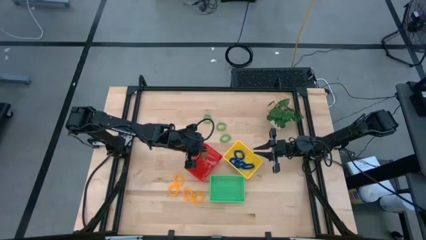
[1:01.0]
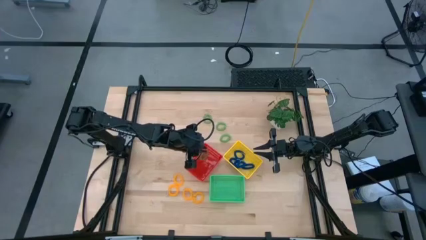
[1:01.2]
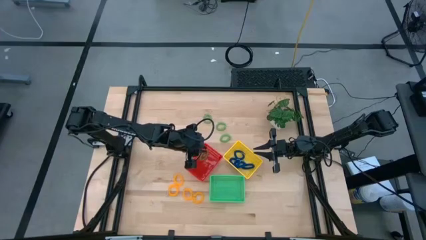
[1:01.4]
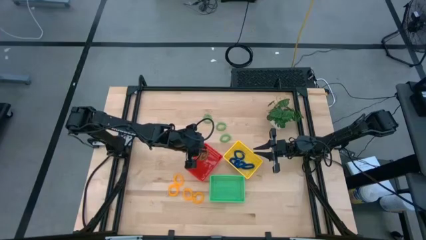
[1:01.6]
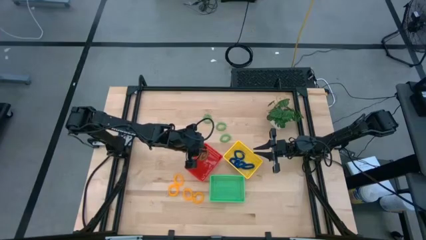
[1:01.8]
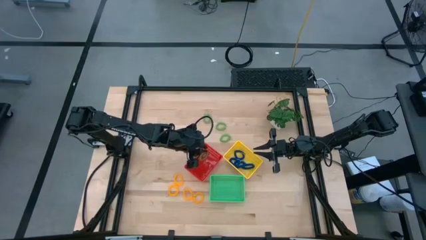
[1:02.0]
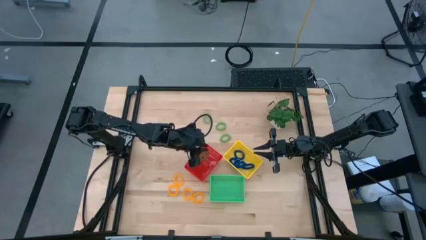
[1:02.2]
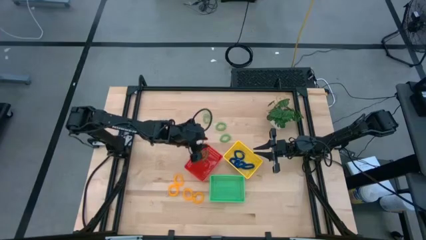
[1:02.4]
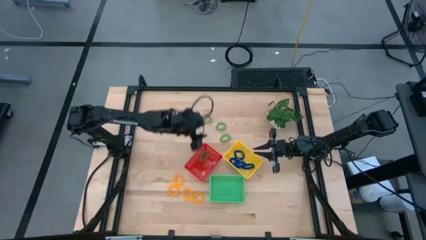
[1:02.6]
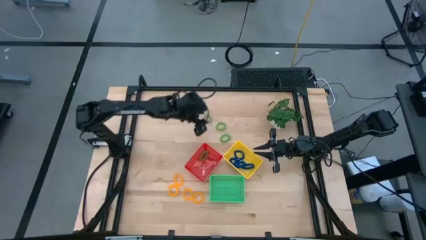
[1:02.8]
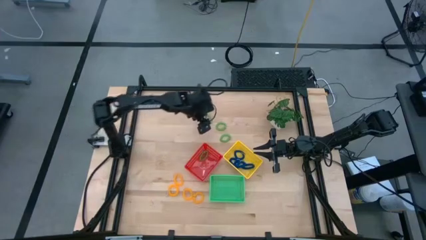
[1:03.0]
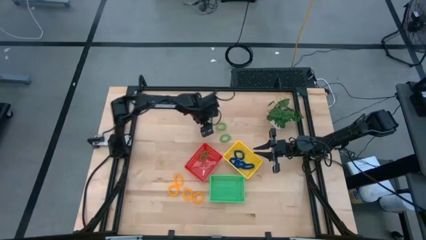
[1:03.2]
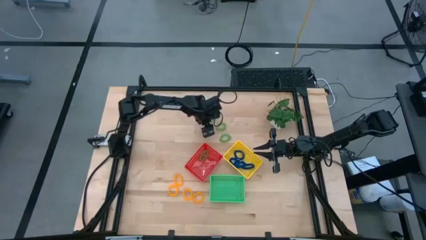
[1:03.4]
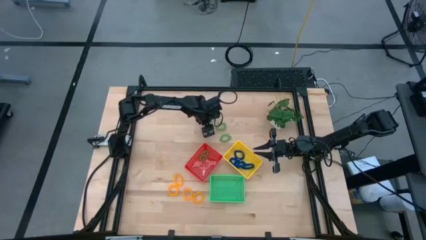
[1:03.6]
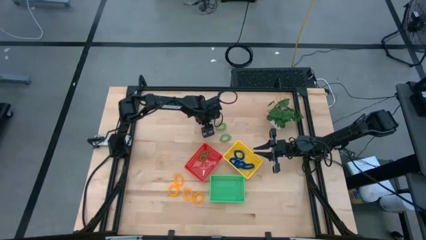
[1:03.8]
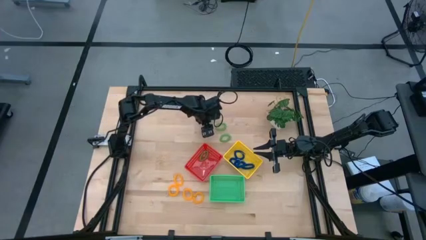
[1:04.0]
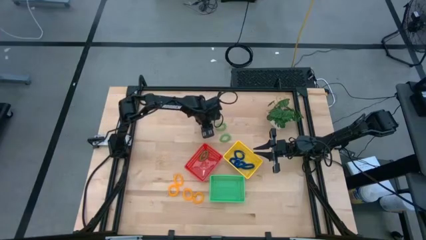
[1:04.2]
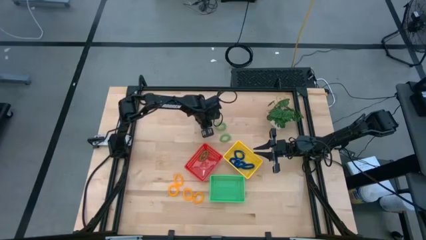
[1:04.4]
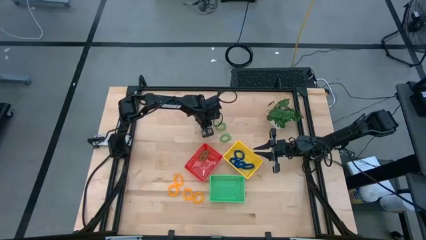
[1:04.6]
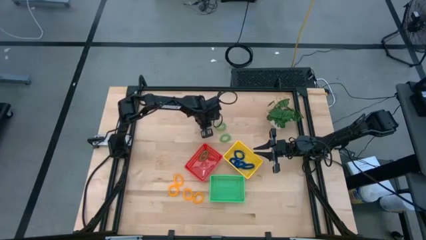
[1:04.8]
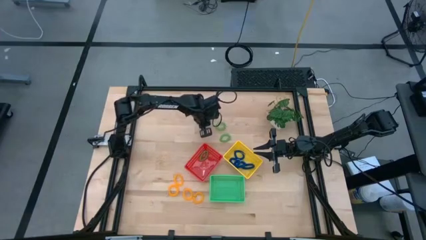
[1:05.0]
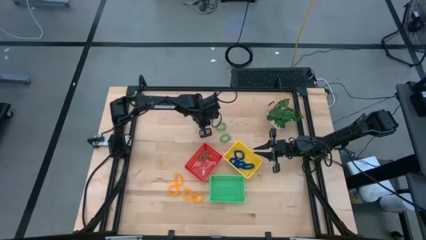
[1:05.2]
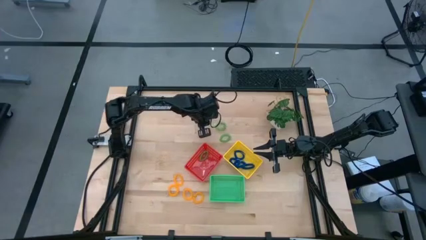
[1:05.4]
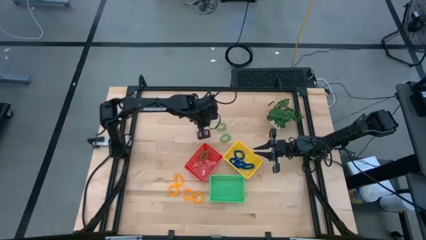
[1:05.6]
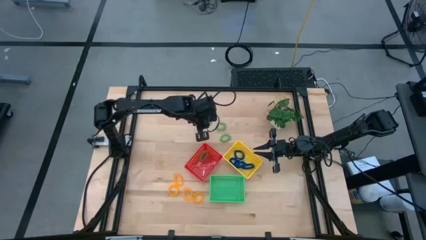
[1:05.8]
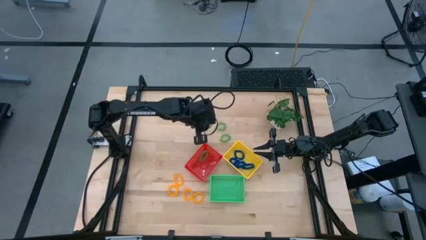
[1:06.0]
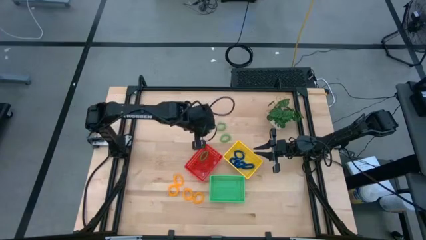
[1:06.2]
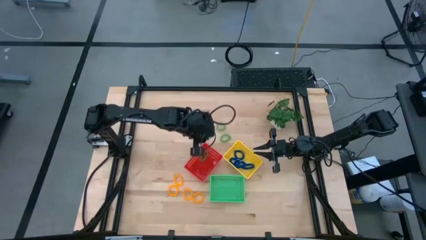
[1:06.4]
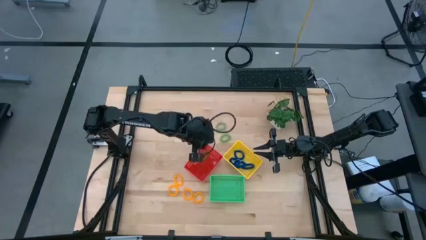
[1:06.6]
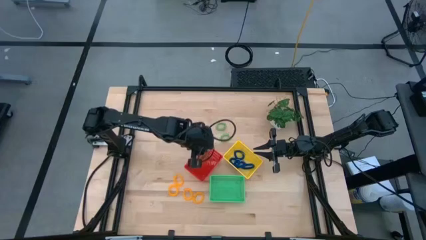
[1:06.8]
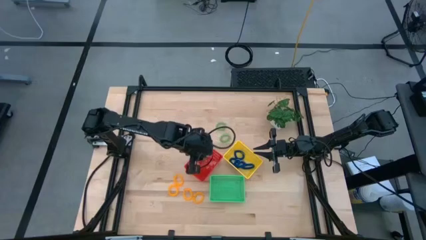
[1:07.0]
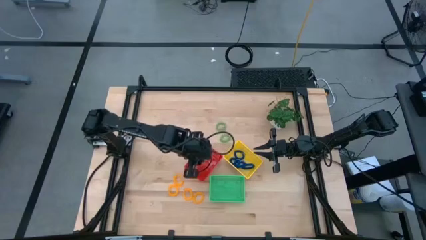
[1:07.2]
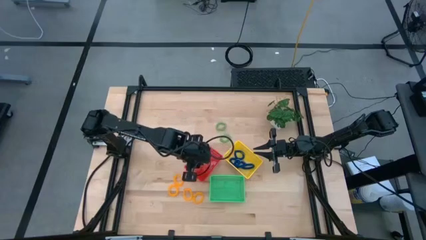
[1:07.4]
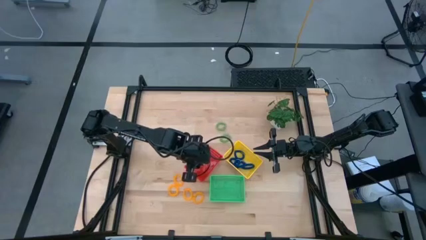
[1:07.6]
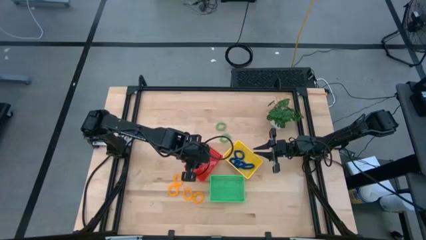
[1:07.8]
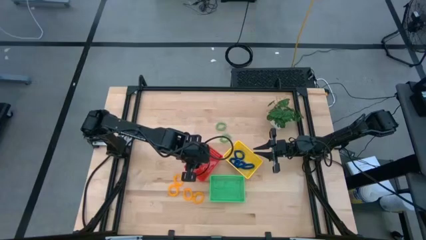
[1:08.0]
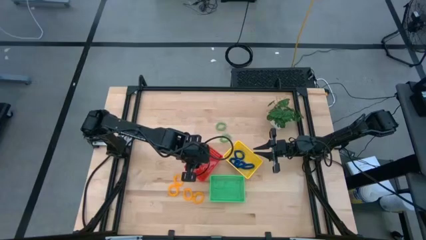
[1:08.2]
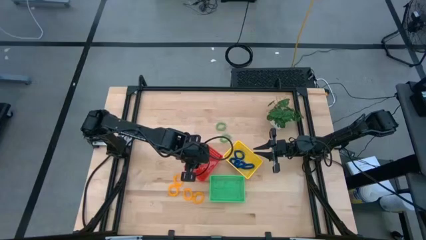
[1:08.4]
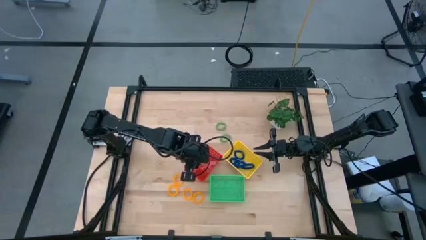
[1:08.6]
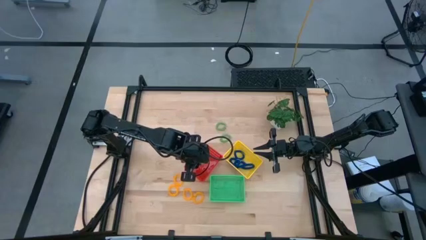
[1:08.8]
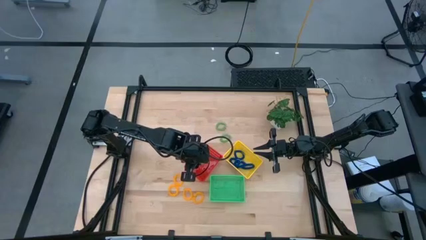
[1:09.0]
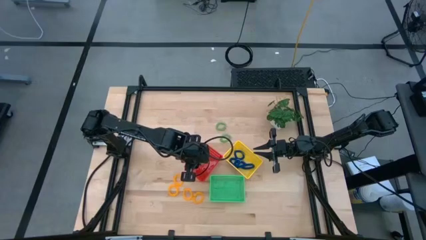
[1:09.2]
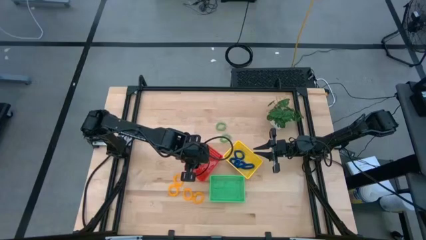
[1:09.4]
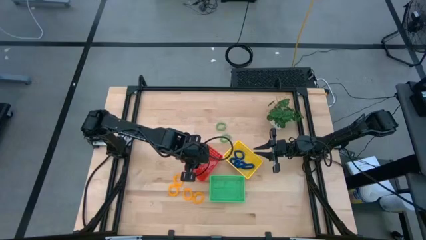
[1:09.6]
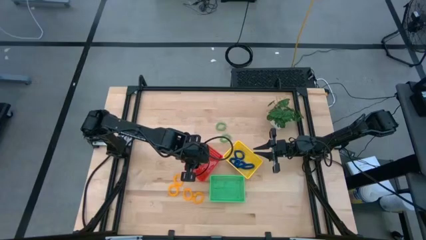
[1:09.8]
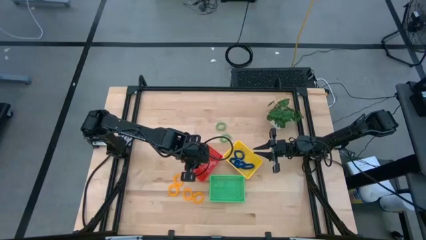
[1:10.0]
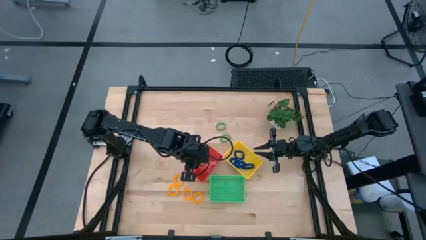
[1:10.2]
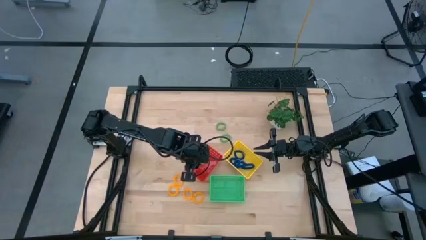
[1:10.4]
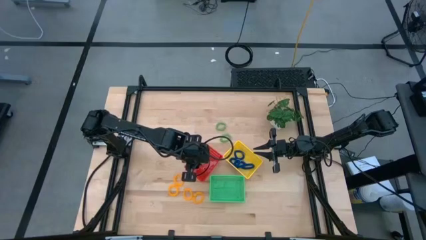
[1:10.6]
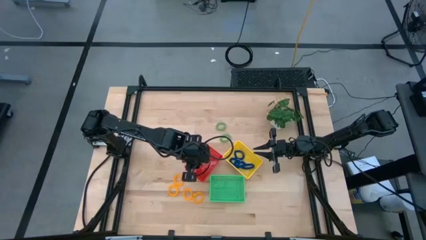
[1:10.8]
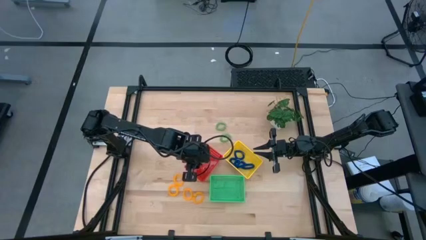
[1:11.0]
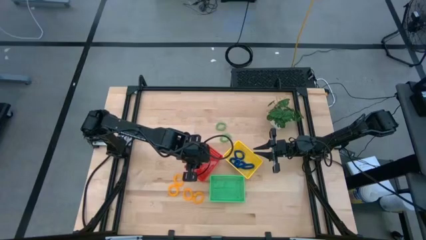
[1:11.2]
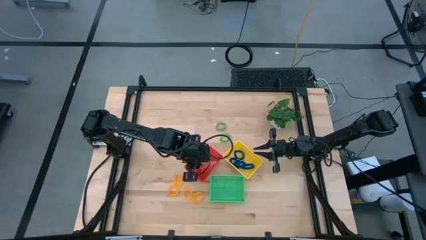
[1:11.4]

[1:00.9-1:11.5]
Task: Sort spring keychains
Put the green spring keychain into the red bin

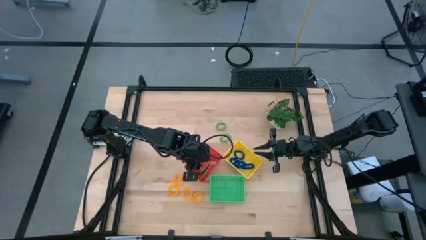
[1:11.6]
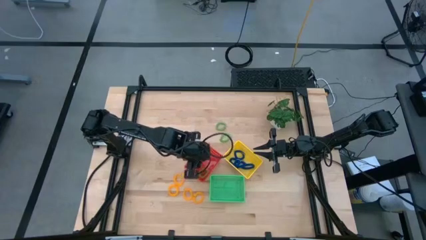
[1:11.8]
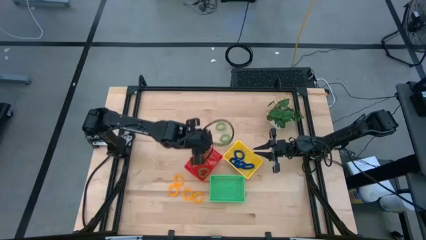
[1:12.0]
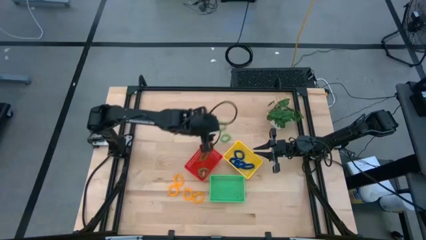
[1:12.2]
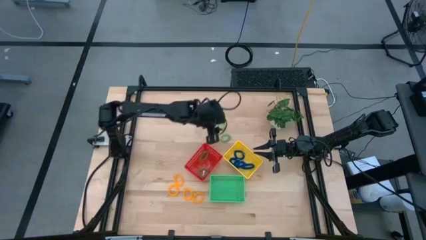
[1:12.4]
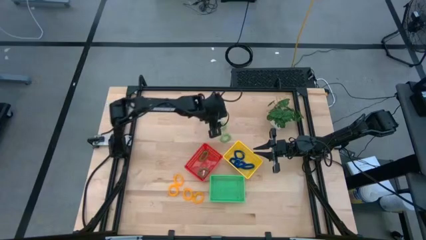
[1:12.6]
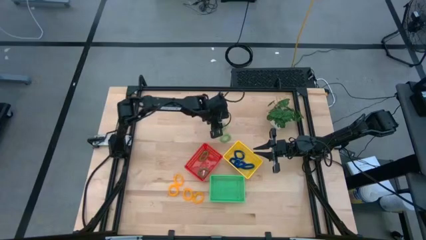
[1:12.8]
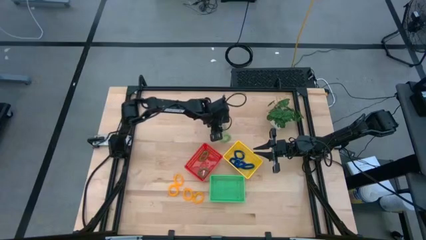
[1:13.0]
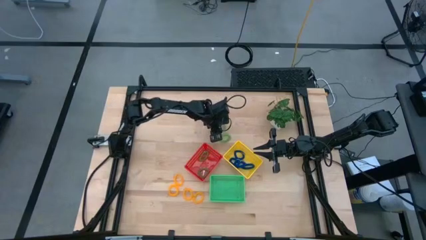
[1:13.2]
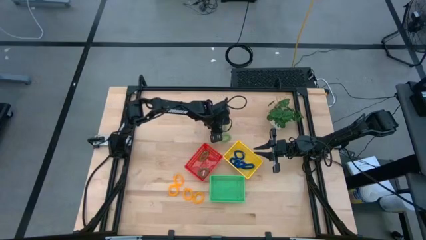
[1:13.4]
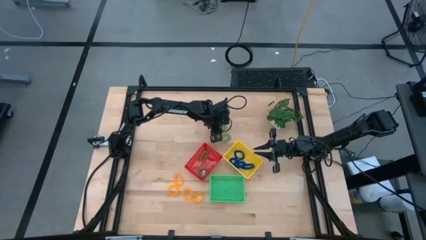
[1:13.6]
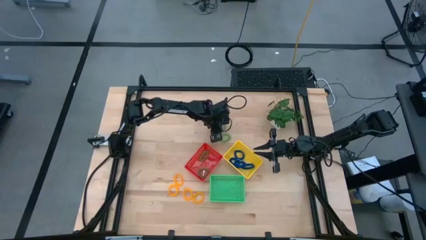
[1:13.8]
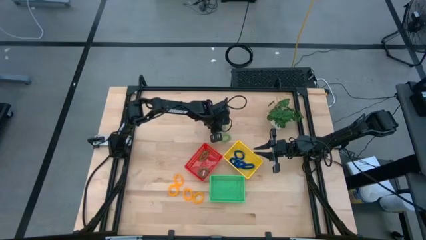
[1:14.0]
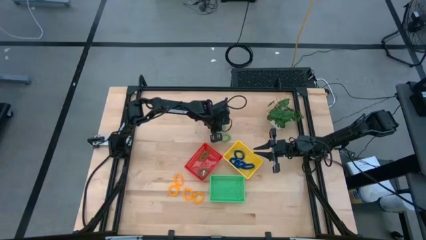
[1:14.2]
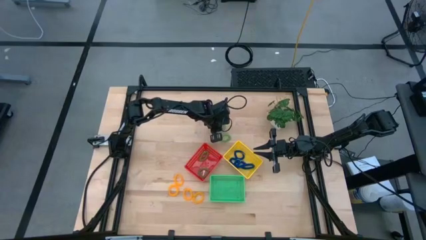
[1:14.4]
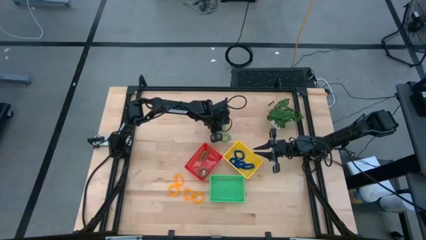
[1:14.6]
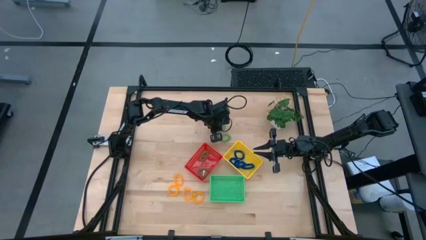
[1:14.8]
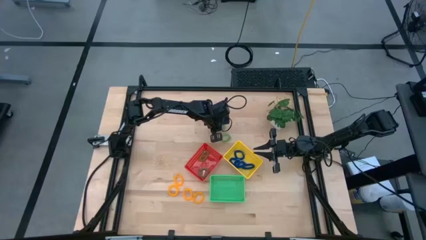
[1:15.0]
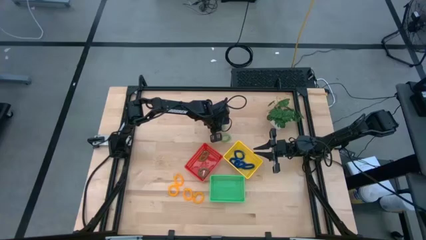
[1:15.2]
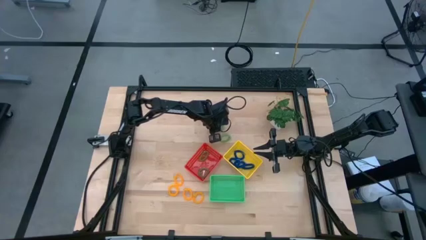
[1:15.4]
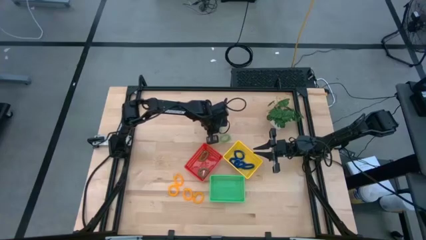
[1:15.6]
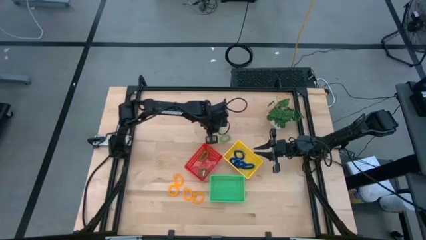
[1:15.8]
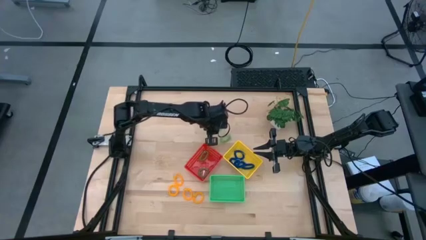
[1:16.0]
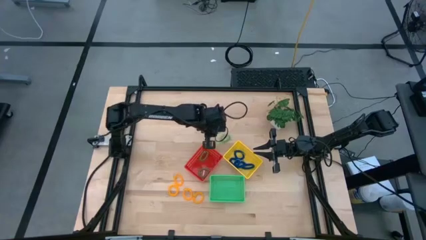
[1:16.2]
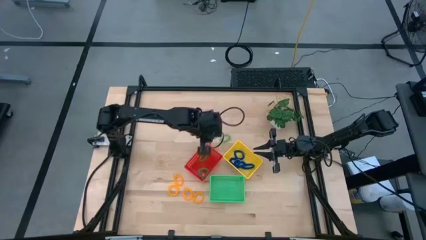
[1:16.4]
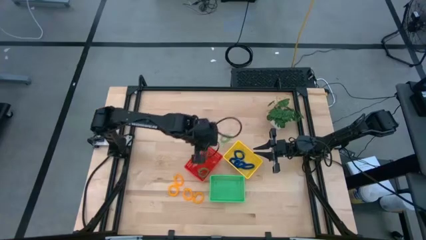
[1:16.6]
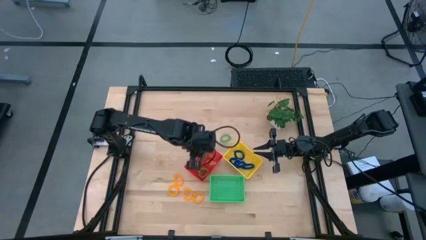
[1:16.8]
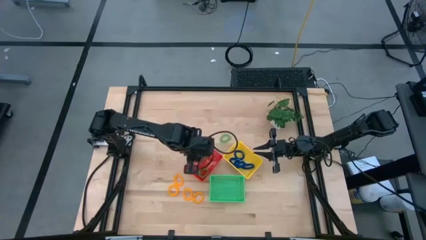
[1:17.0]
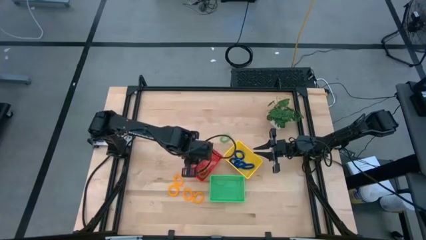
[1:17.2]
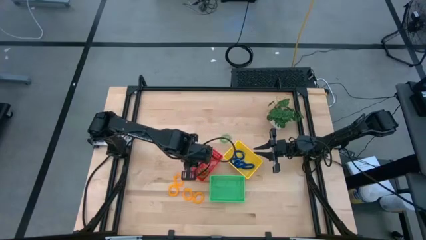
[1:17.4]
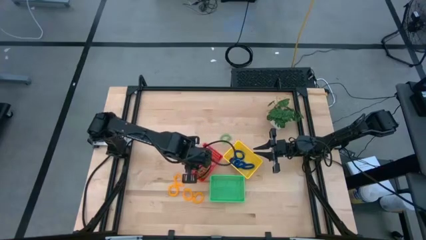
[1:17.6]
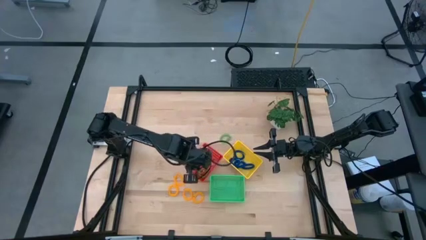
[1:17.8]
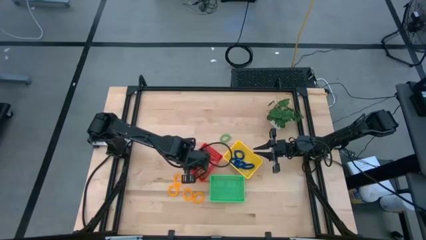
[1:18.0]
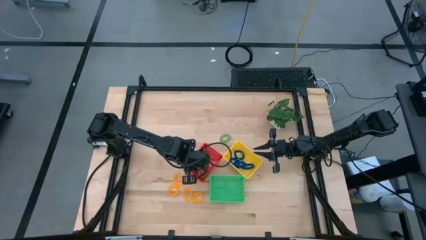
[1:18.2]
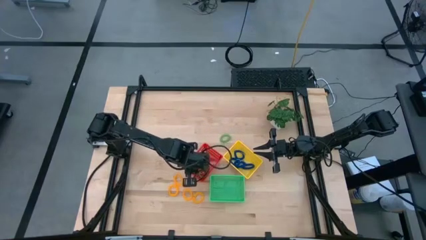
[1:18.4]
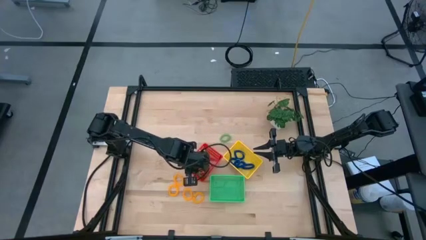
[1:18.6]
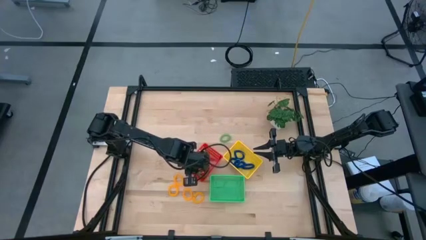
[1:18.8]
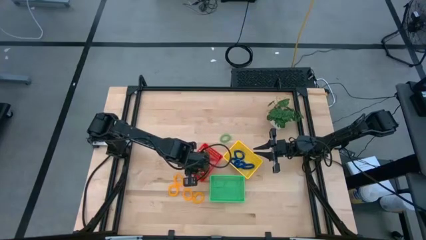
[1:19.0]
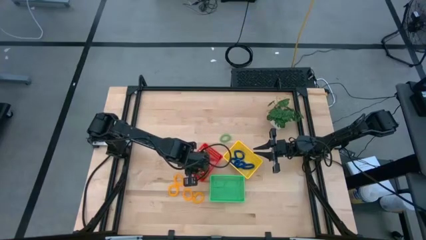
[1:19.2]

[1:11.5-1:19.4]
Put the green spring keychain into the red bin
